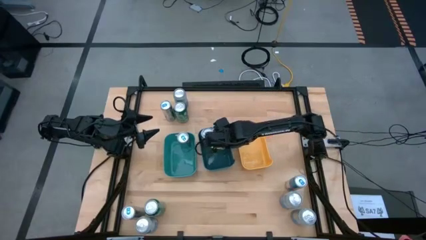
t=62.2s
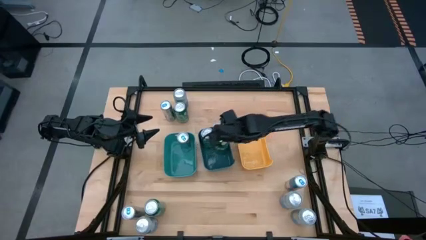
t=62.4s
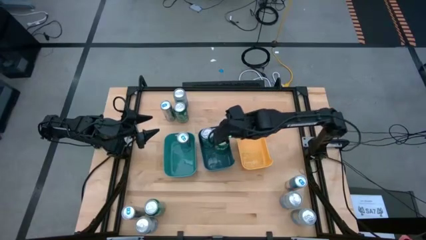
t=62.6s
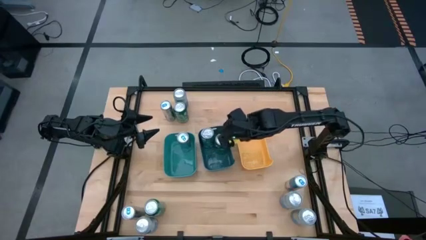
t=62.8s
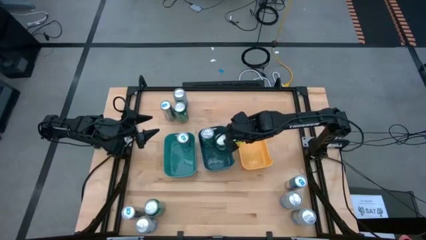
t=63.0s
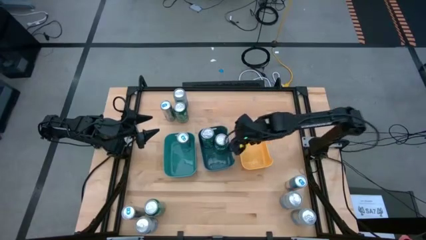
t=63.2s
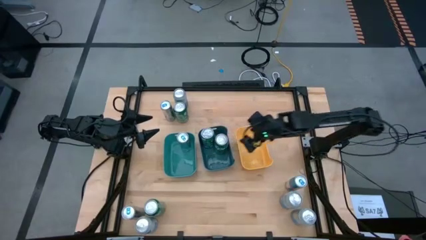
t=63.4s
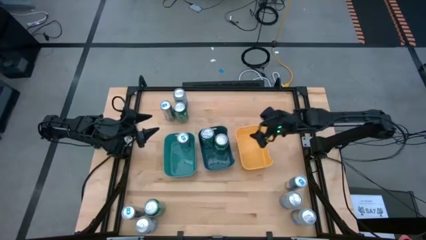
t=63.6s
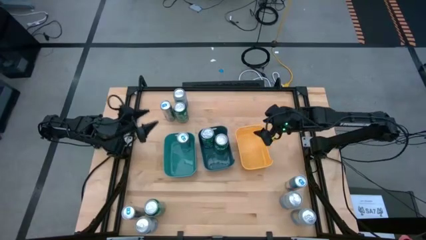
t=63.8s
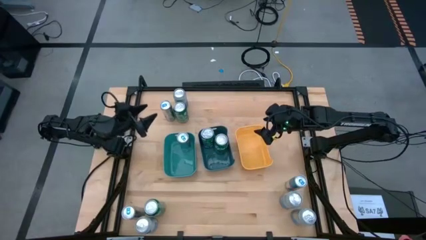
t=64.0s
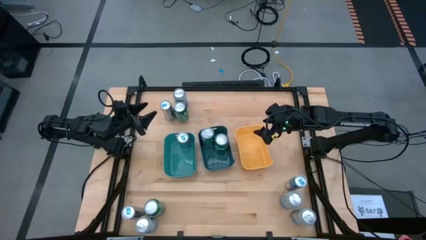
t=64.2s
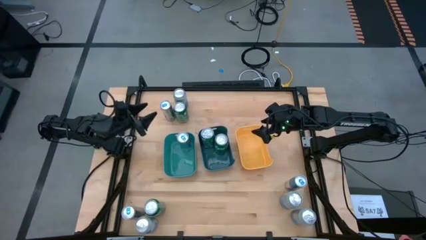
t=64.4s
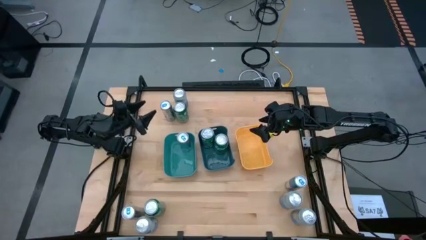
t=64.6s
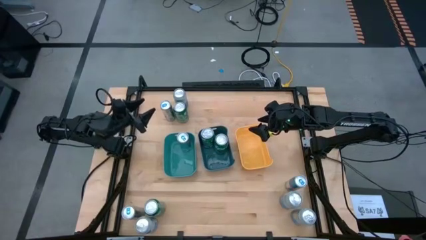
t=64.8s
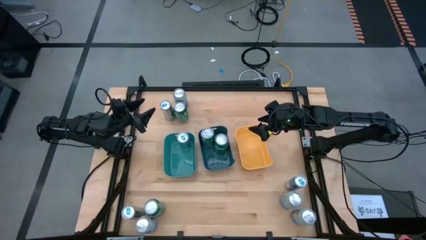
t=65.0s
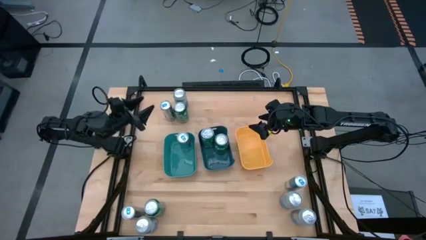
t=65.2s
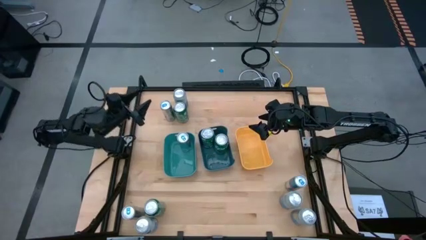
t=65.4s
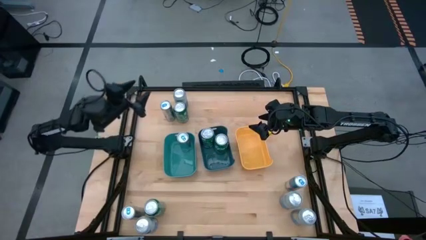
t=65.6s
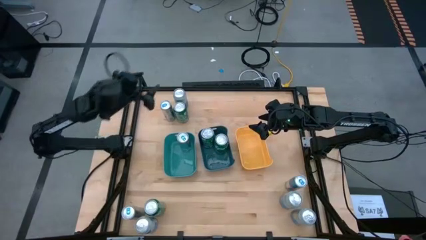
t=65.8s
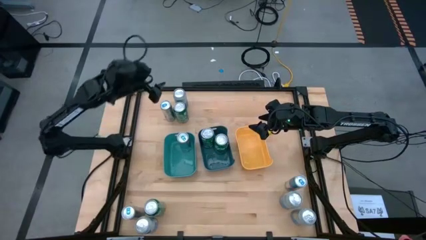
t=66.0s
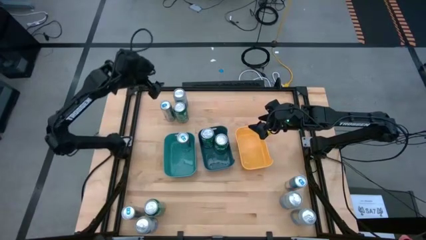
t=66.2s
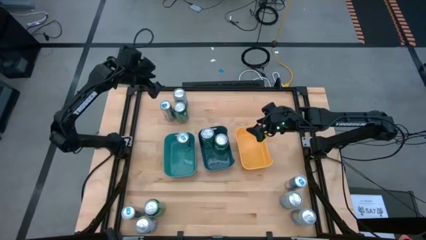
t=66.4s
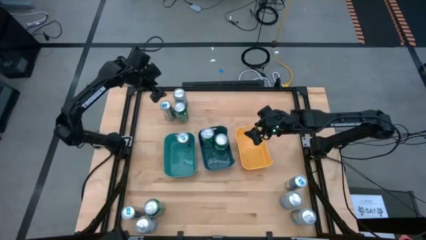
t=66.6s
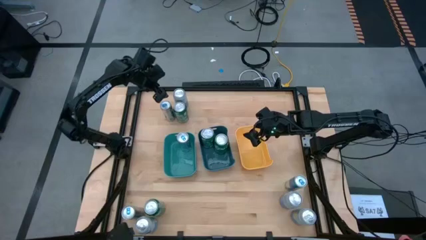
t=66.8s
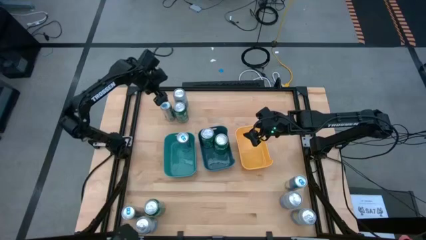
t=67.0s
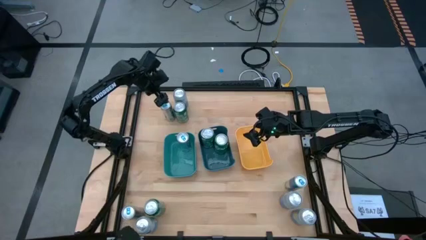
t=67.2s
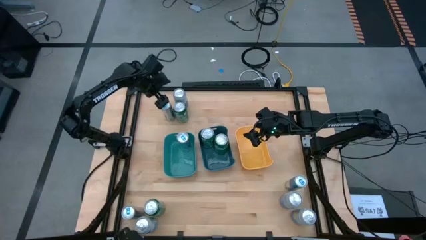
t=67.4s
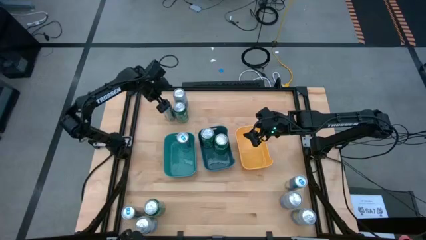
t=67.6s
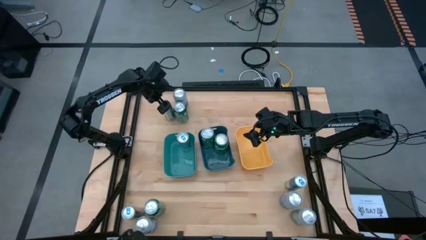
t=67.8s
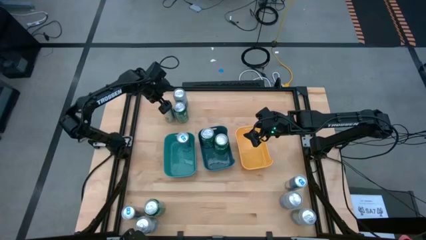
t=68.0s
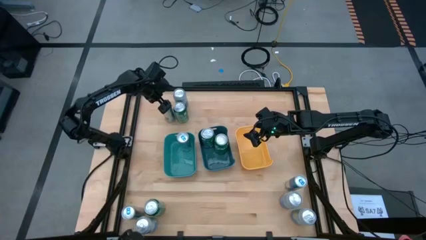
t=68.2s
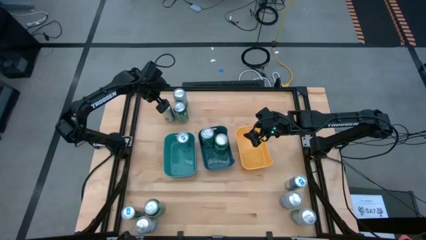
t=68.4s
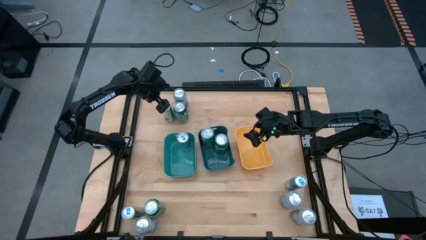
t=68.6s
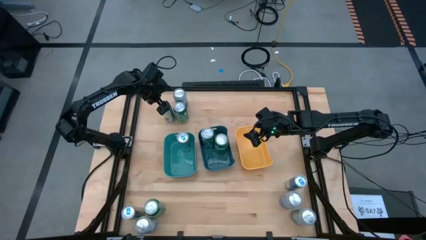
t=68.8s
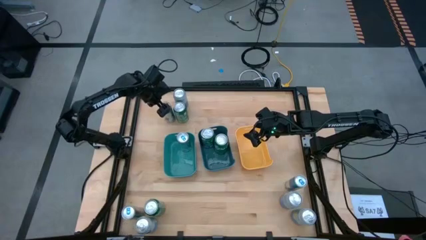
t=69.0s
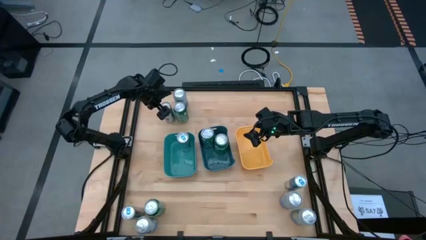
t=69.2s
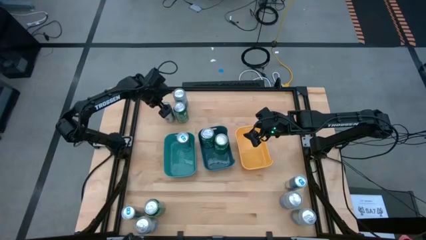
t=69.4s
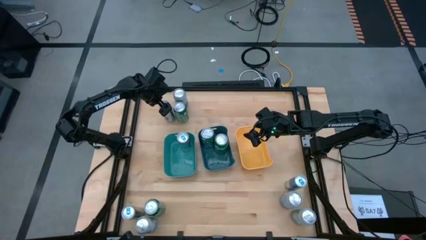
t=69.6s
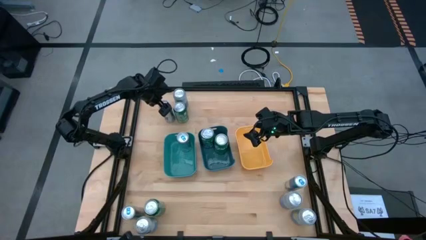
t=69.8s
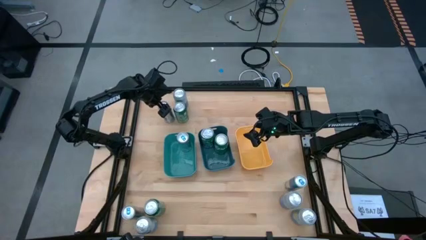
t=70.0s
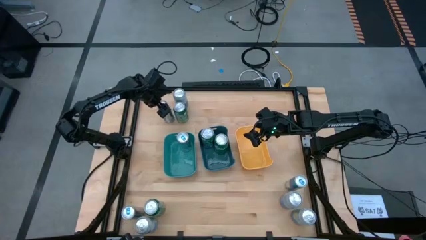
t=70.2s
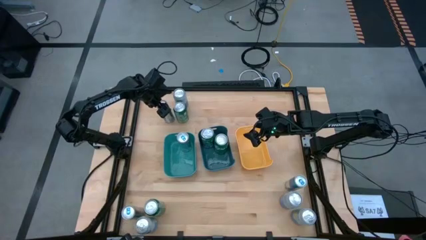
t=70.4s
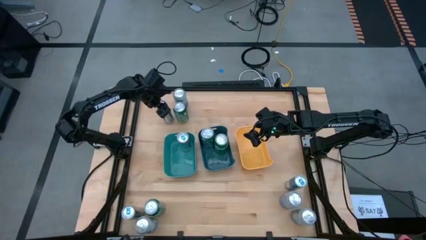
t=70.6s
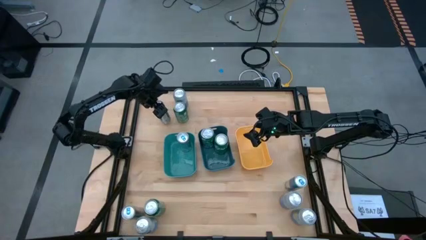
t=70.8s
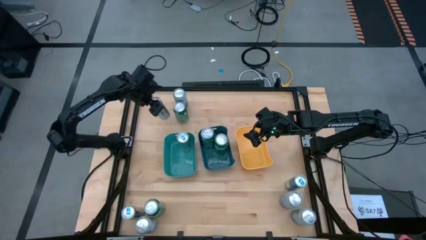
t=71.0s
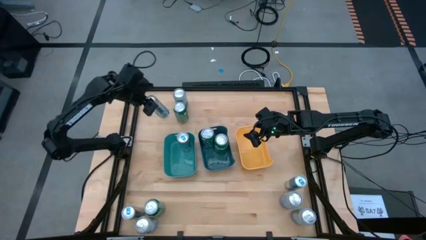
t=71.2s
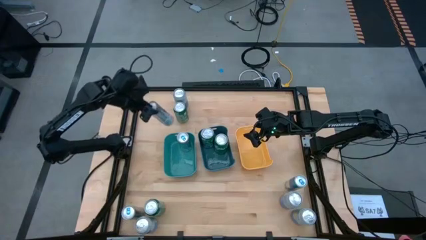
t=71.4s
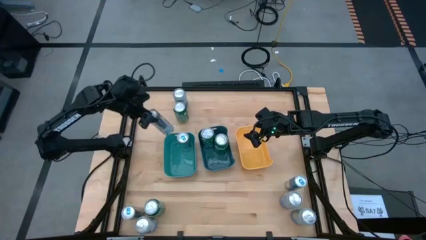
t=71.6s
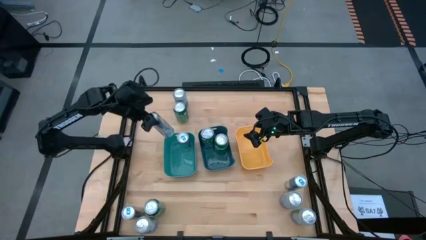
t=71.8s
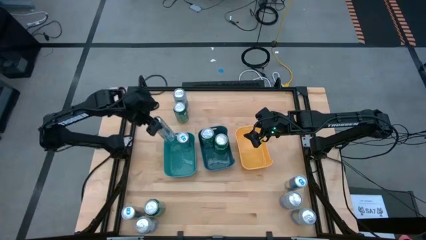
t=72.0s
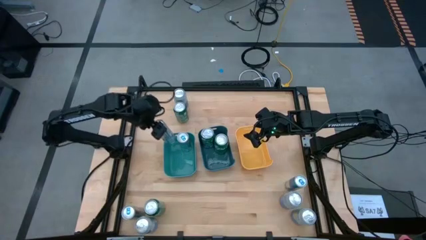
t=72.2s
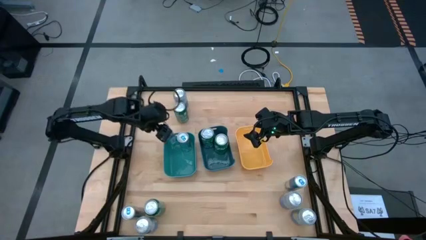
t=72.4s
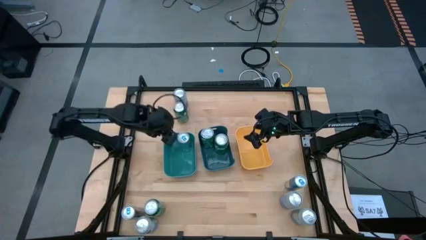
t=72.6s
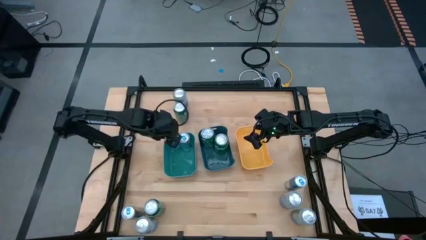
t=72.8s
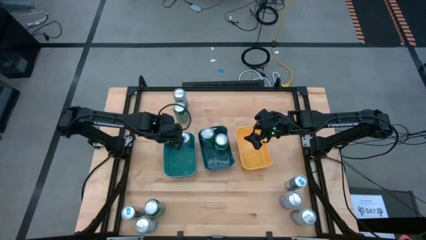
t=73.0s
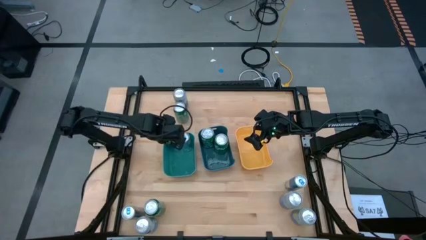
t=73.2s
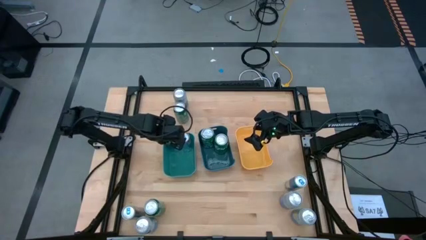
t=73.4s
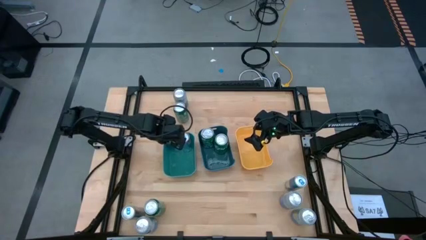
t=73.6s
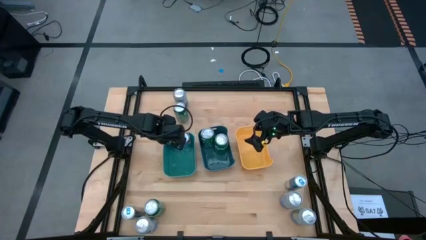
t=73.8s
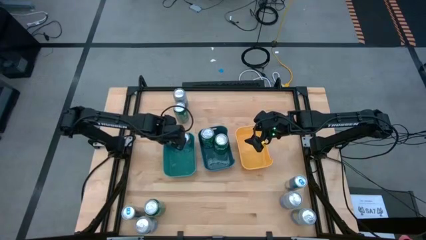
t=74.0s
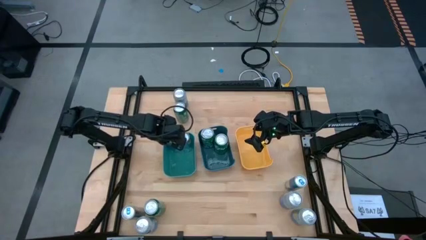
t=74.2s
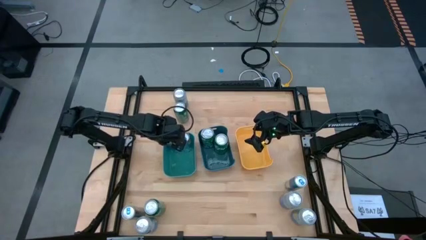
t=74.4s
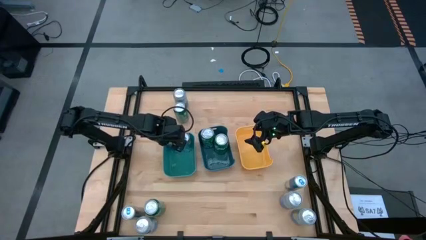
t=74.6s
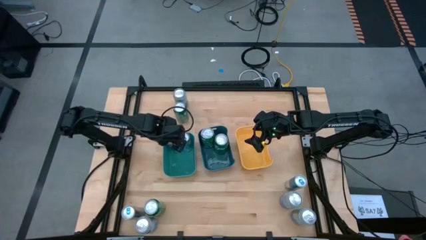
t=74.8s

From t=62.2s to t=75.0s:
Task: Sort soda cans
Put the top white/blue soda can into the green bin

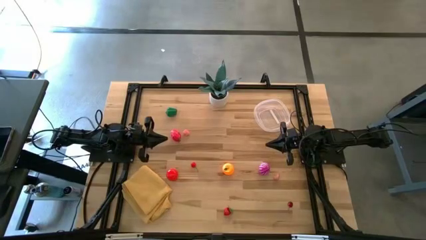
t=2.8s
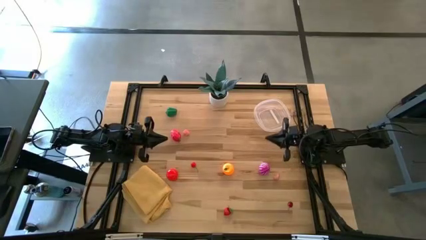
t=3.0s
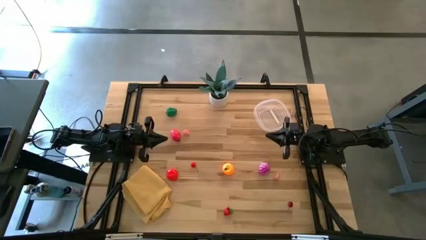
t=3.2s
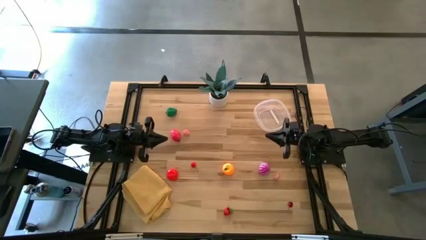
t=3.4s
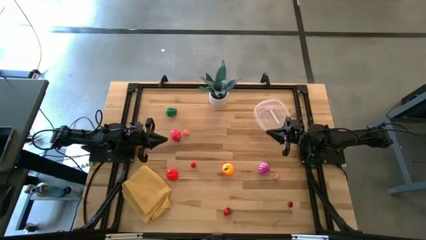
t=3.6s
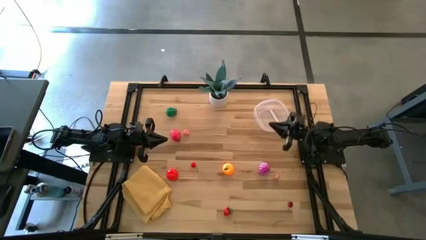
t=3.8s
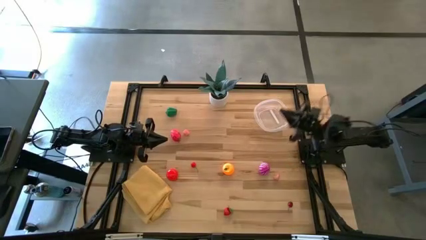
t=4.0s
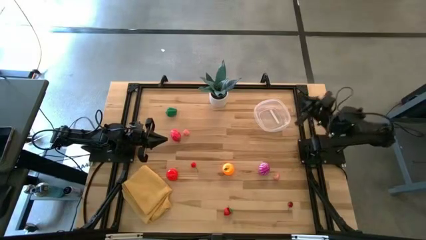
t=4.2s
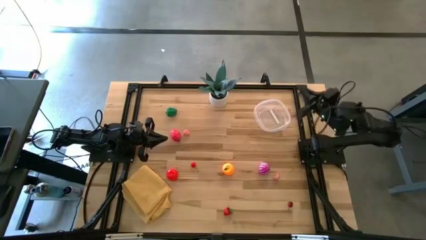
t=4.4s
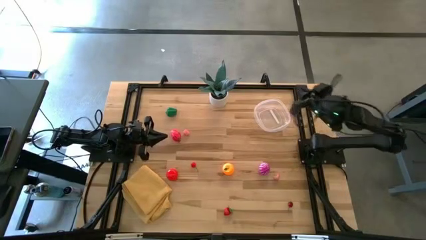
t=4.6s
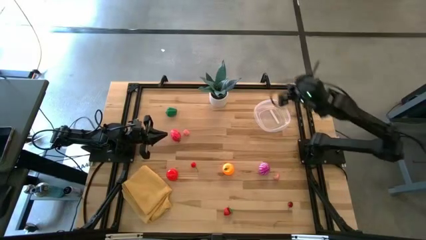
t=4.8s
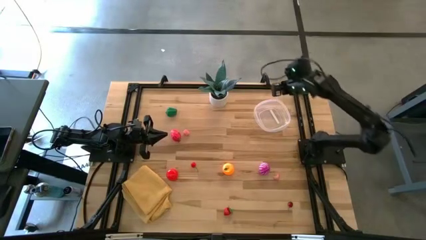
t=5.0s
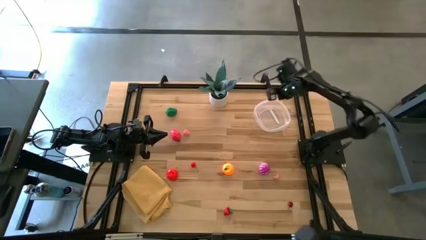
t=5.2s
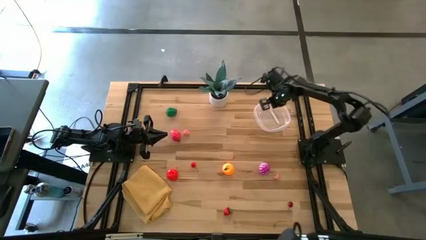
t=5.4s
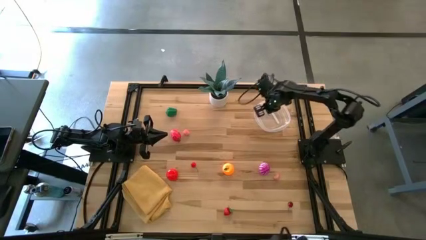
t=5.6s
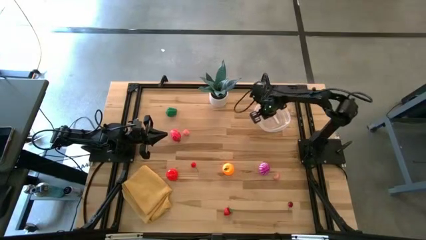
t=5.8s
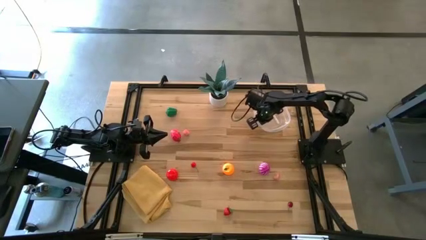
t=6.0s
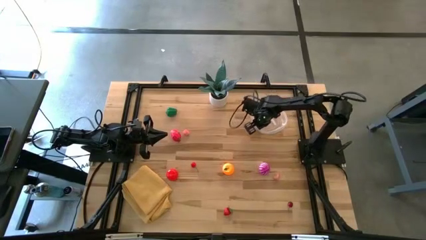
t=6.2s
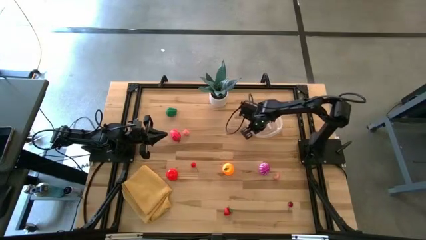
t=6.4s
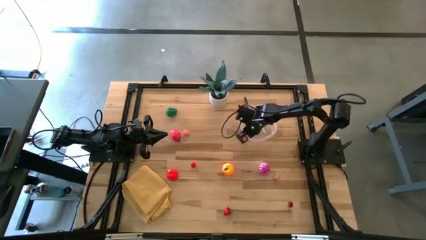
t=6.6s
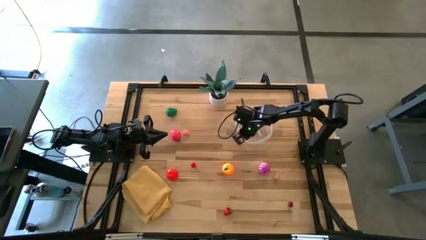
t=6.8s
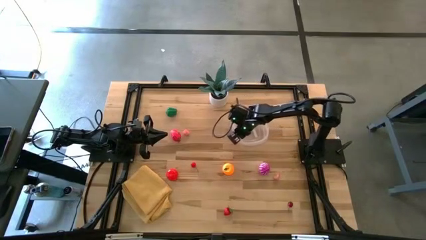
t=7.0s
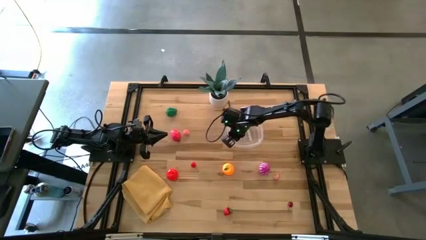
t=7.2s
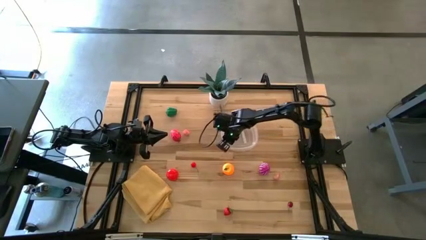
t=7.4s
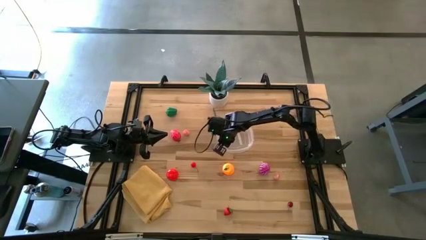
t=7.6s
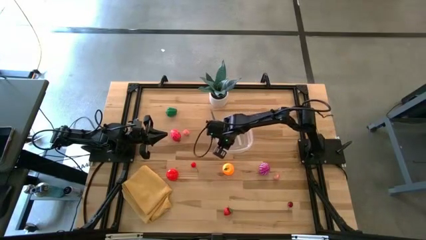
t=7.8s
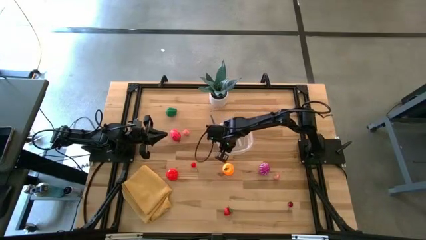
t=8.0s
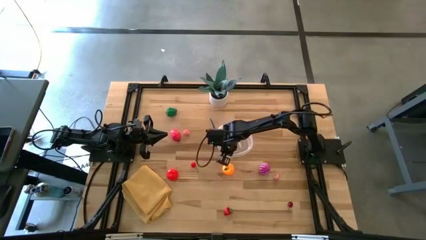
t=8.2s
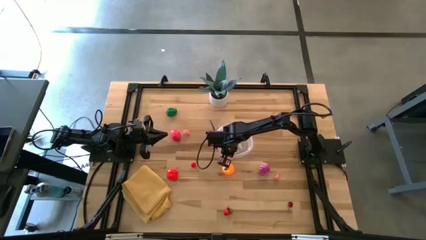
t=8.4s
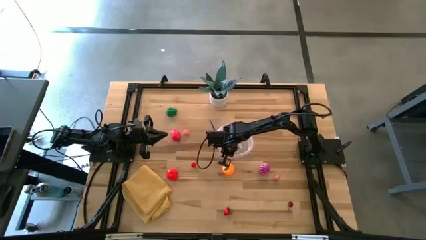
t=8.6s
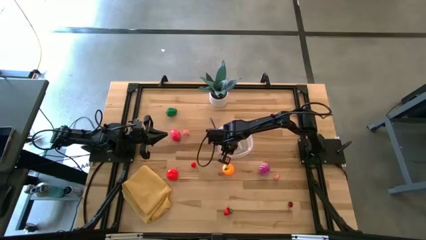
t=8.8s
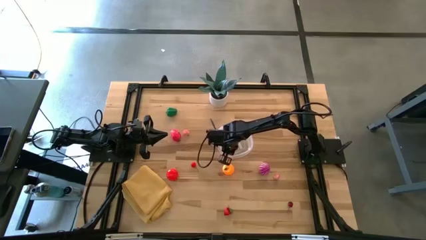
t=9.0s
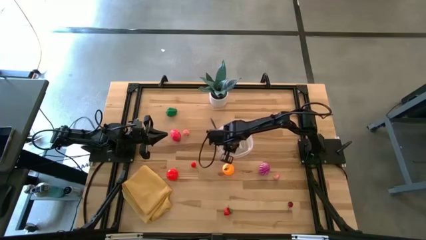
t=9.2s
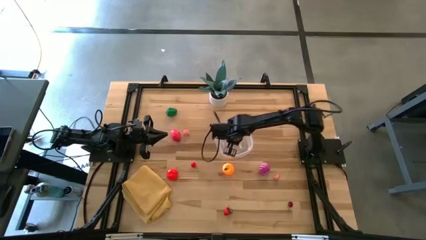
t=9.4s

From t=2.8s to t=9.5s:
Task: Pick and placing Produce into tupperware
Move the transparent bin to the center
